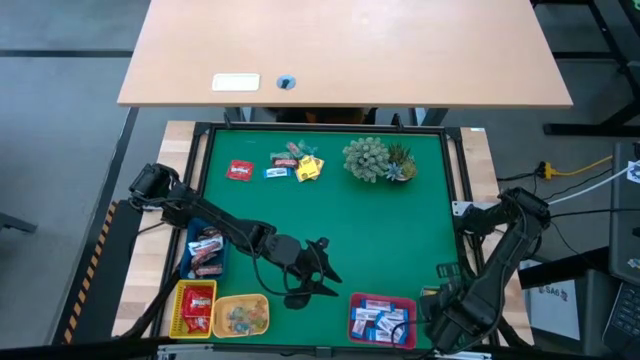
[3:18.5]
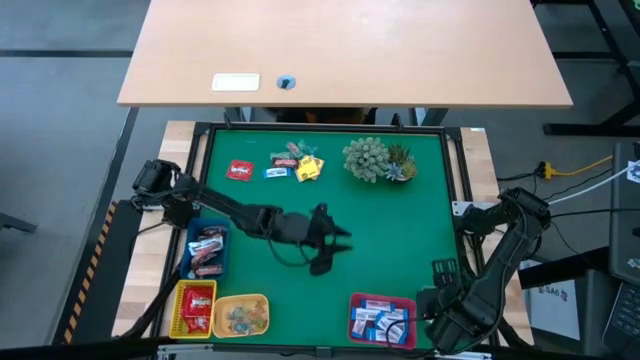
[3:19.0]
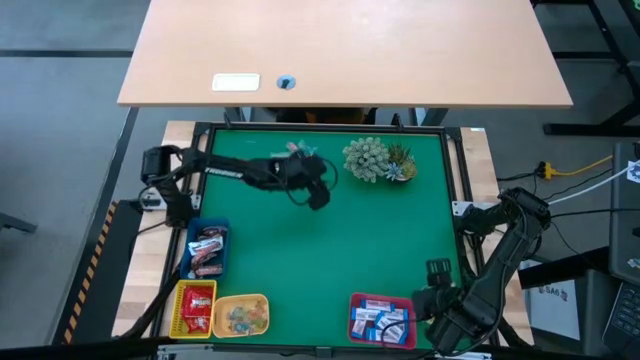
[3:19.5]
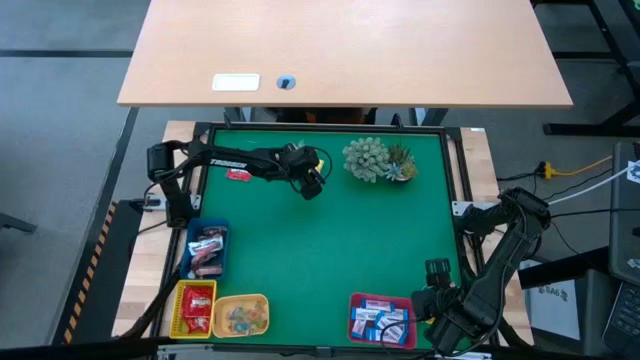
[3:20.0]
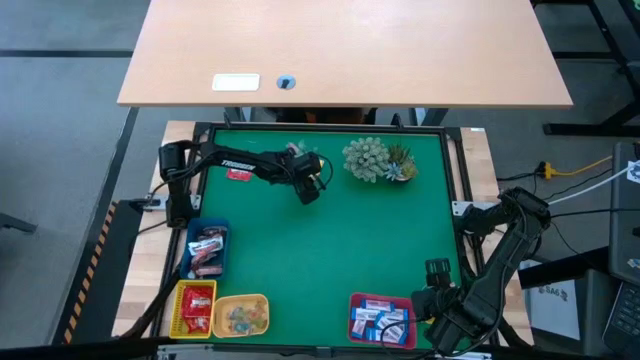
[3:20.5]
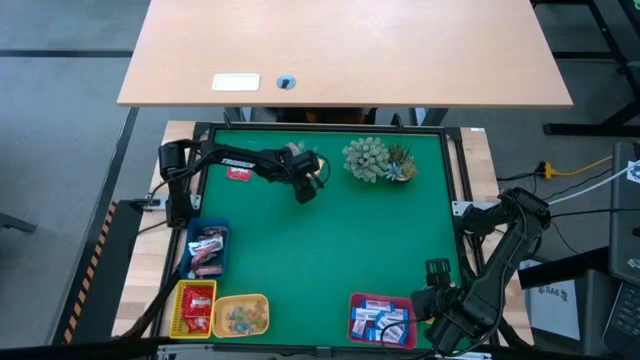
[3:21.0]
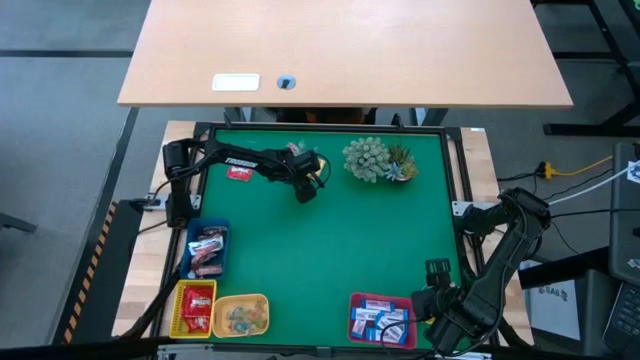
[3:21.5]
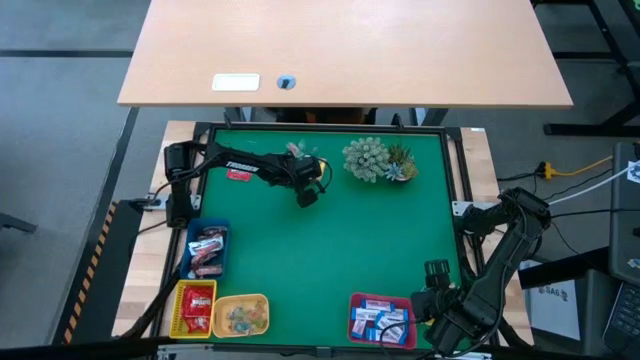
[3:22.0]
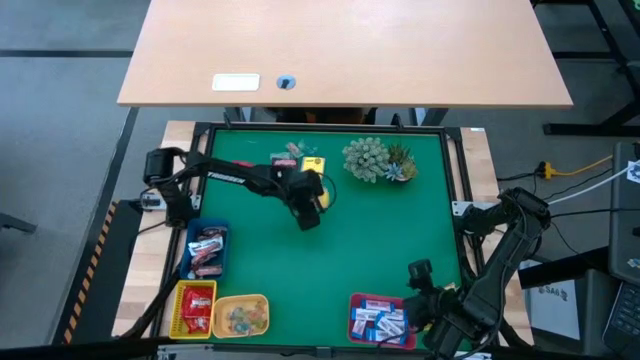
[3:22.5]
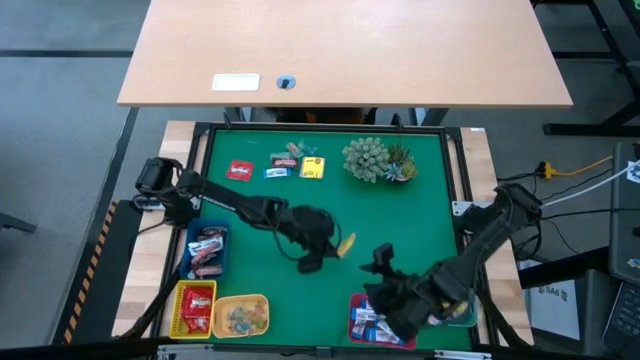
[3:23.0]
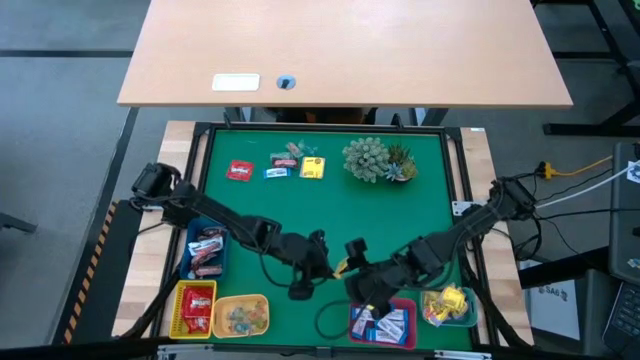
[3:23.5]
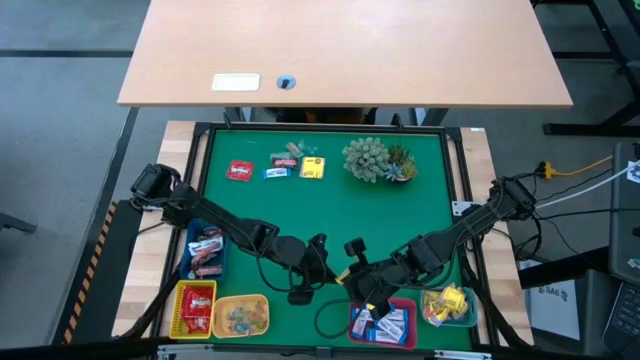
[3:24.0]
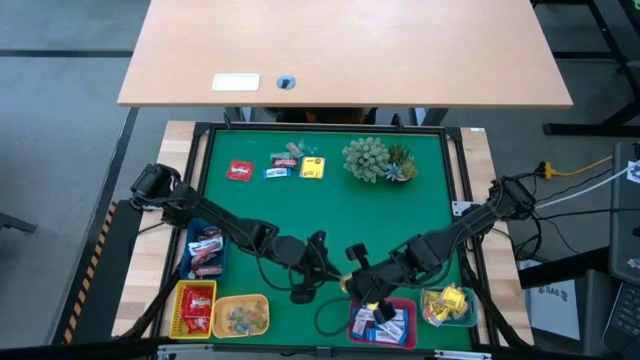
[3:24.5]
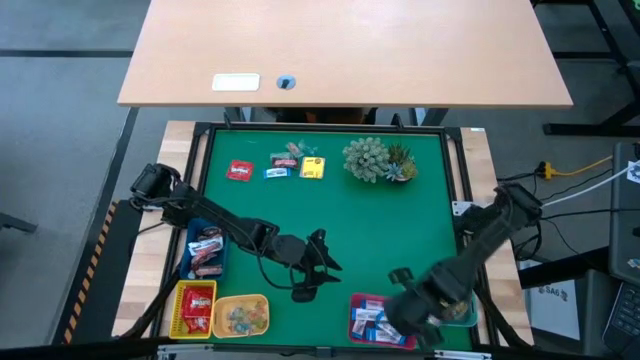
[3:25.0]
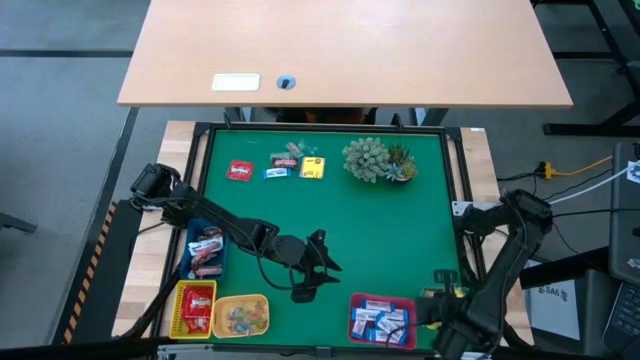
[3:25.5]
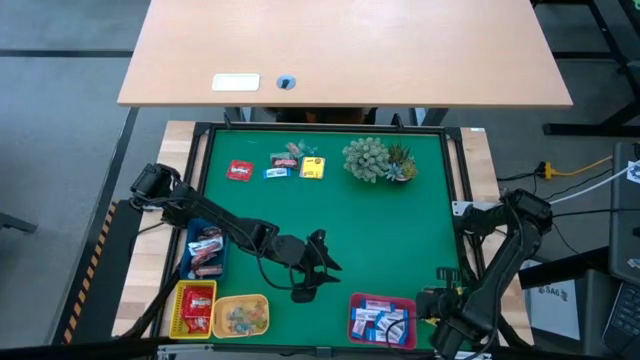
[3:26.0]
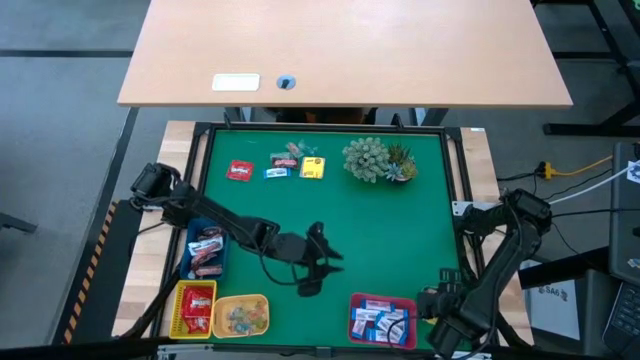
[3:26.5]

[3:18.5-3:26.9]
Task: Sort candy
Put the yellow candy into the green bin

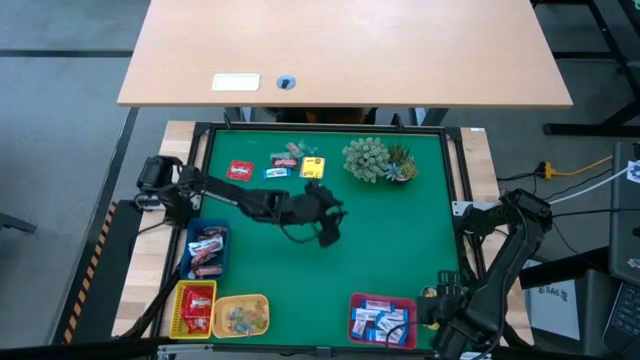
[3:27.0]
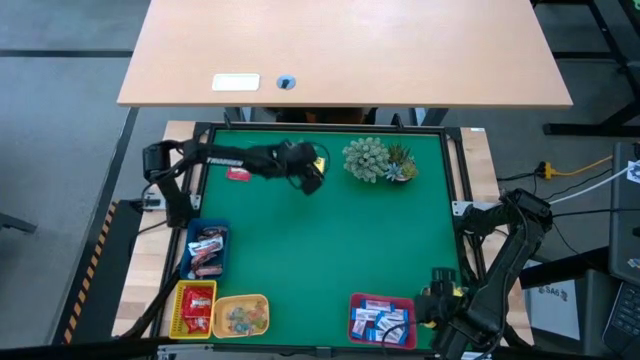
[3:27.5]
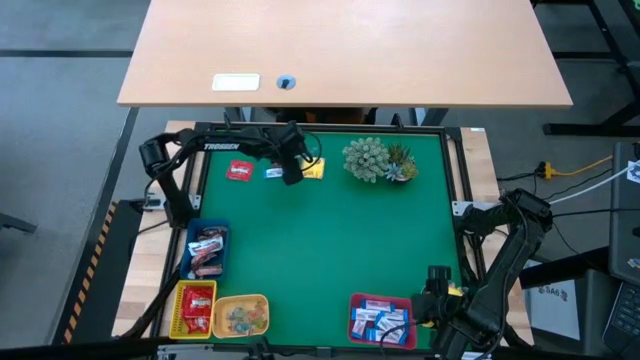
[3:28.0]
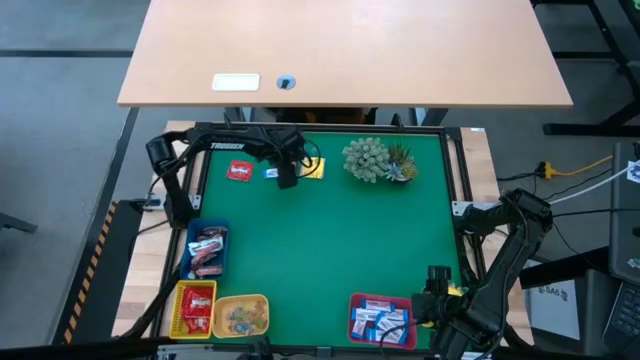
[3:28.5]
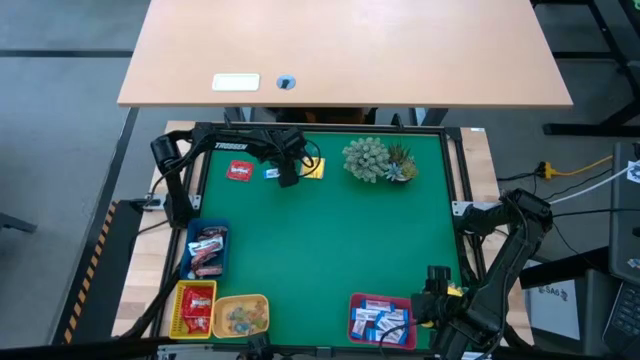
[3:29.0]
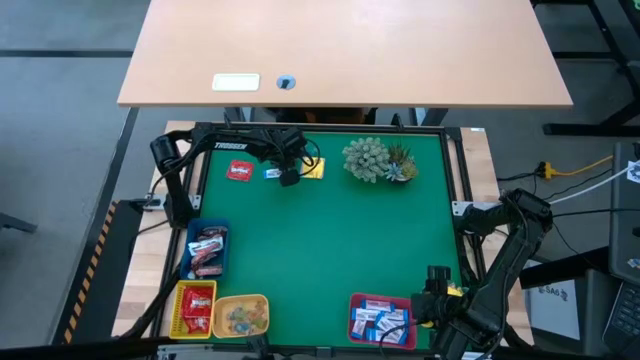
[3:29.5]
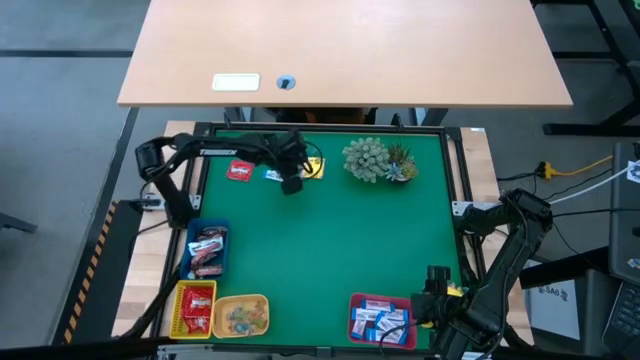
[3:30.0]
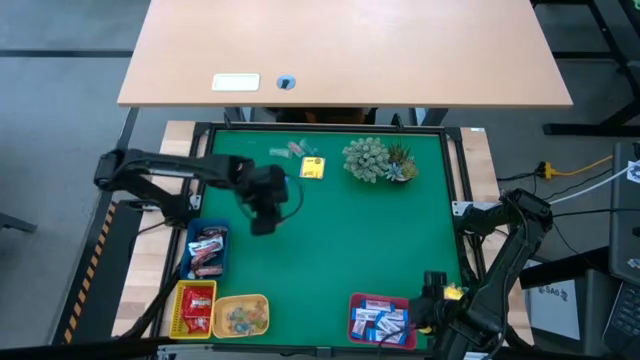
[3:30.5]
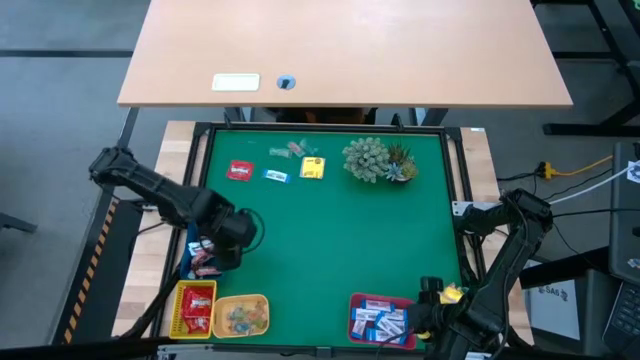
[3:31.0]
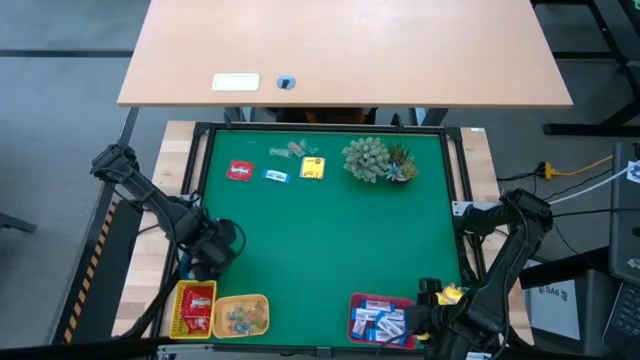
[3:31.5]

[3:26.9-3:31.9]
Put the brown chocolate into the blue bin

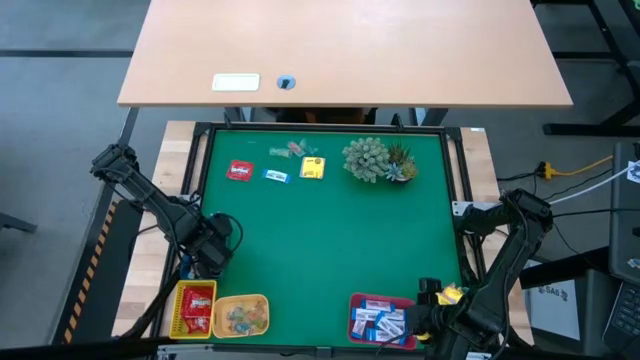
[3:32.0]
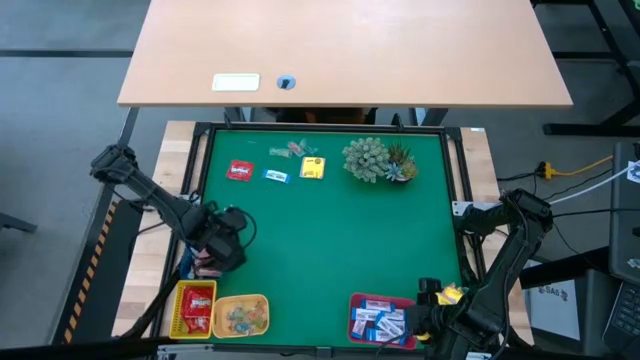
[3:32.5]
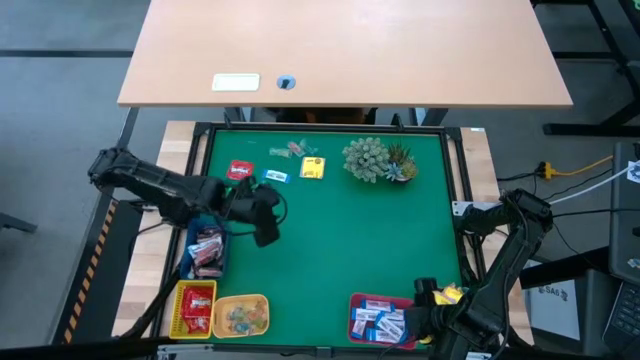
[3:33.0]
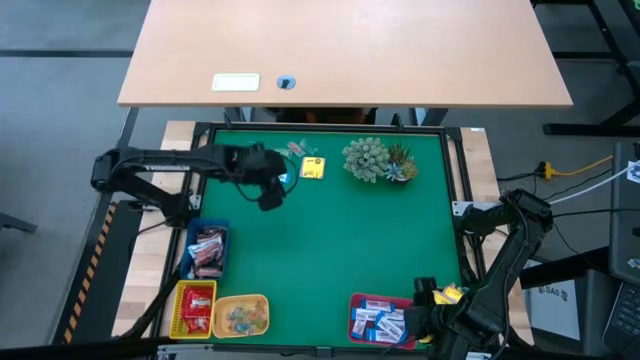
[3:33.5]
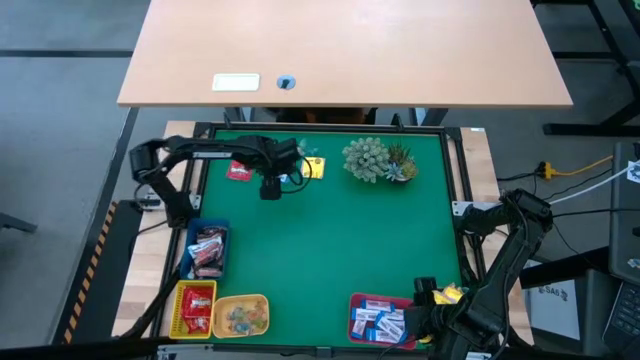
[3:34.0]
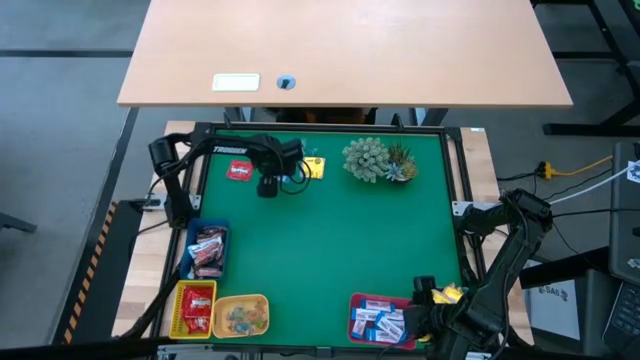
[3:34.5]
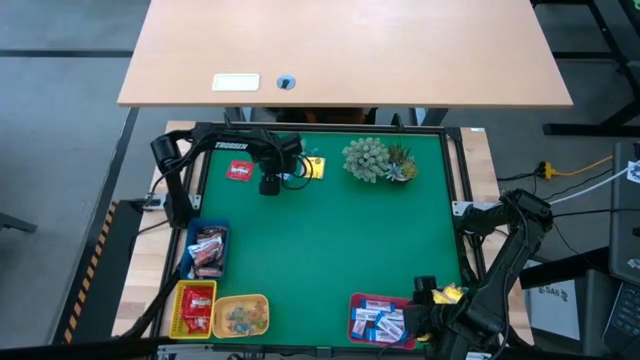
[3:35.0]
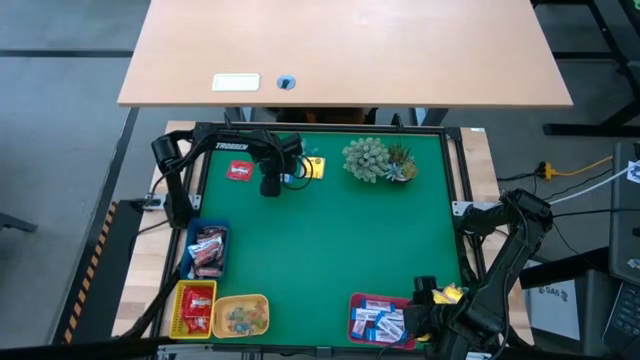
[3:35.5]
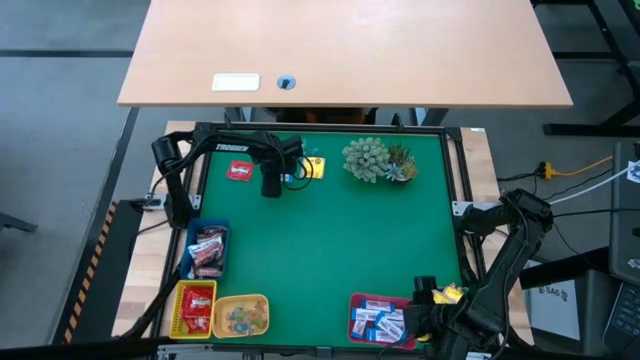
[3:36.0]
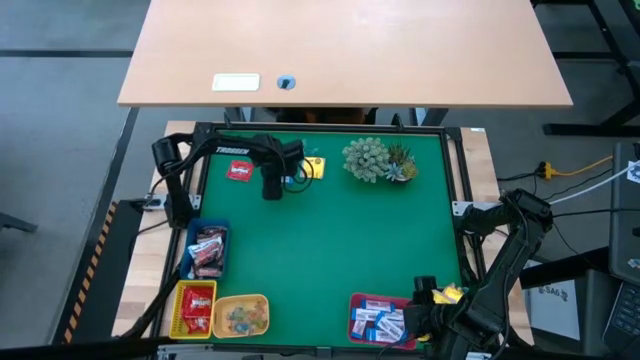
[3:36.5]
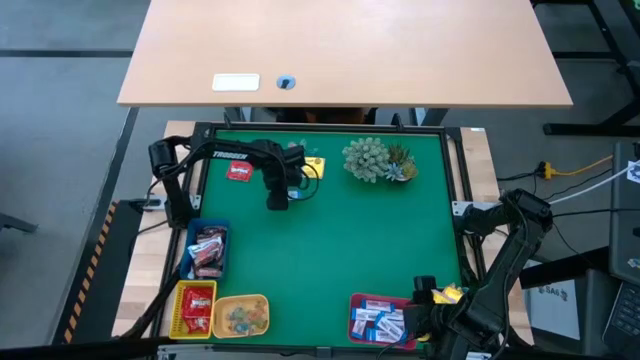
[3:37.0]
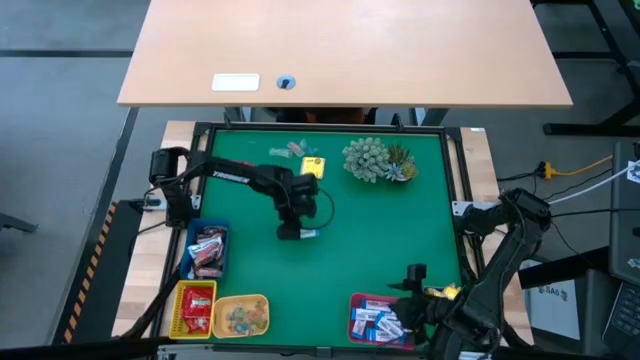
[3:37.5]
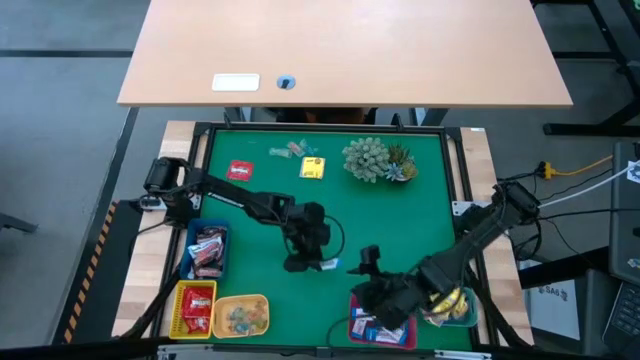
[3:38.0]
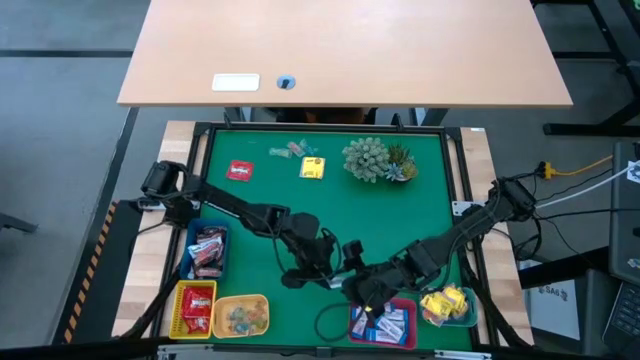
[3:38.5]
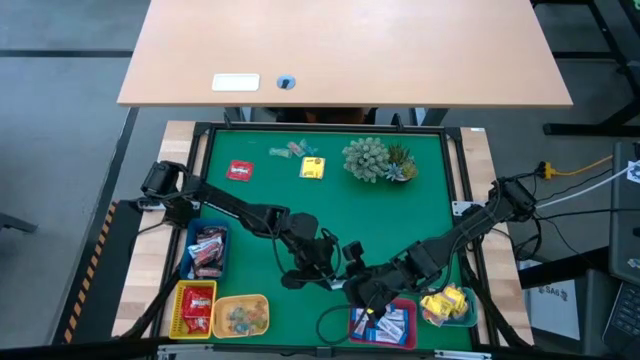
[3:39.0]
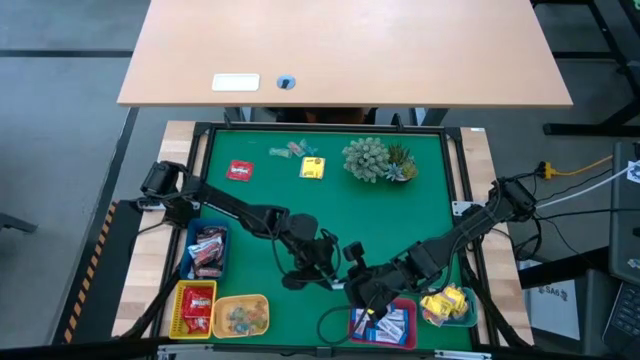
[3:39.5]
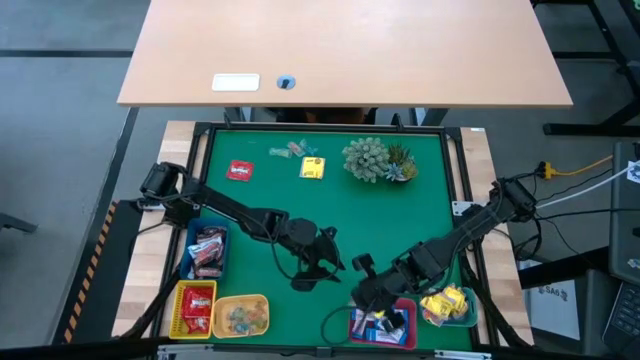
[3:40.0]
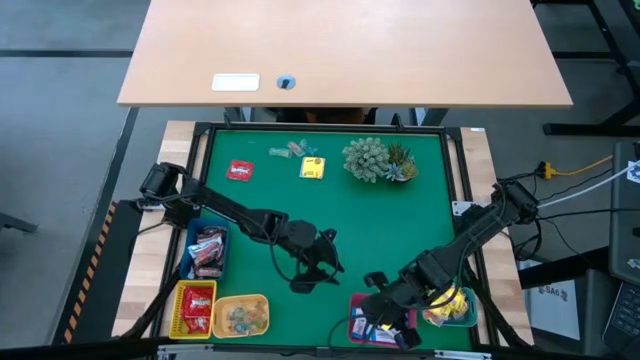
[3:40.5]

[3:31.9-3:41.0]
Put the blue chocolate into the red bin
